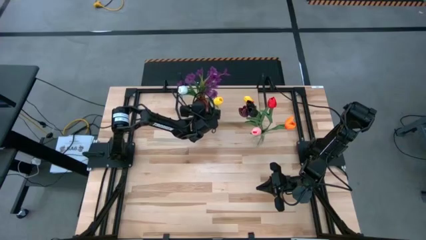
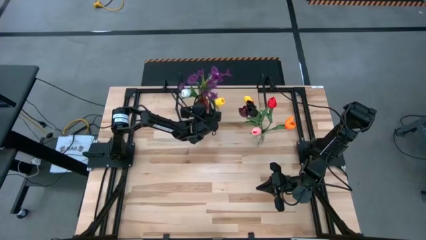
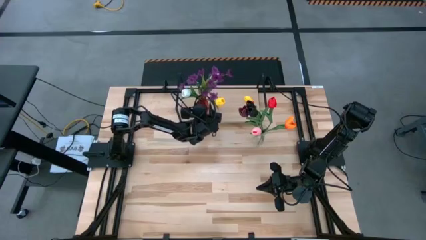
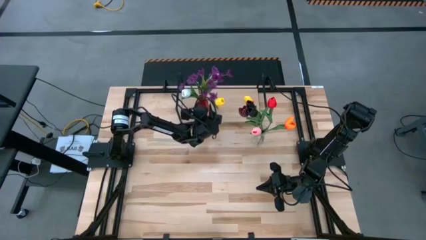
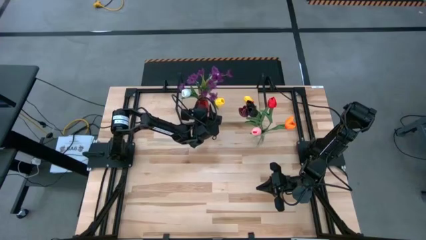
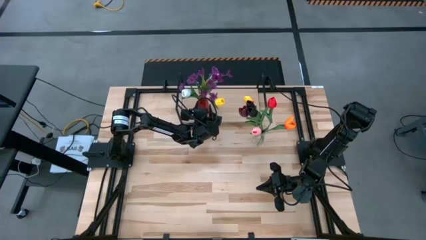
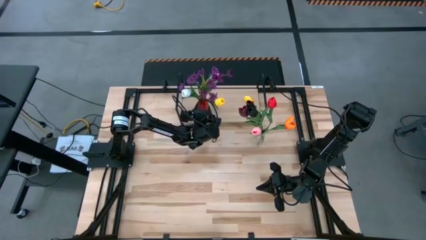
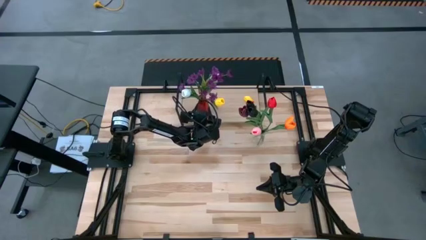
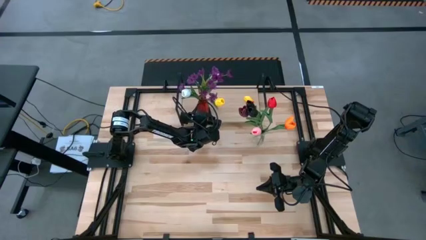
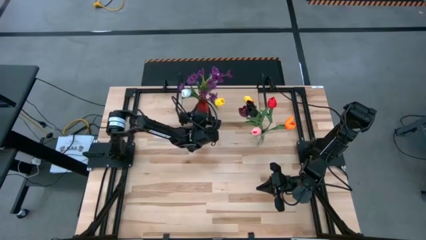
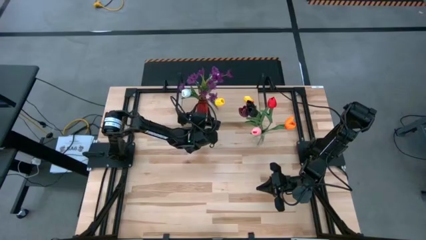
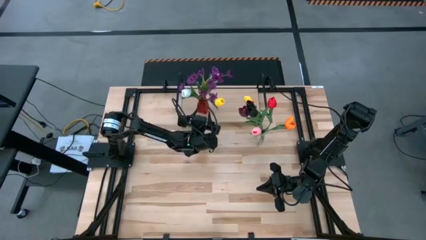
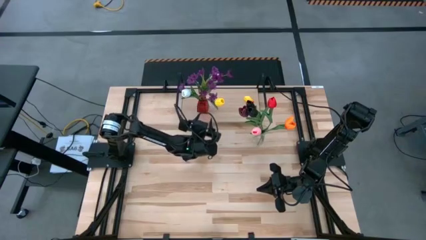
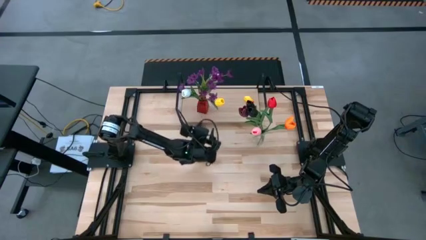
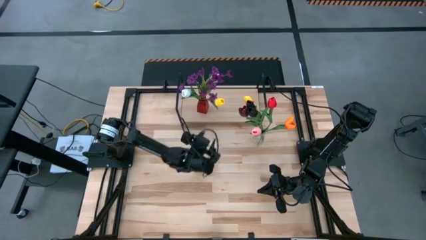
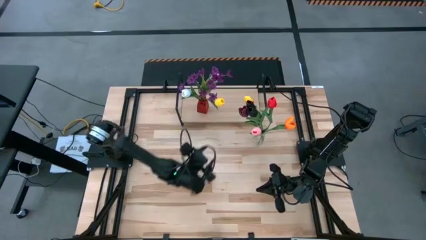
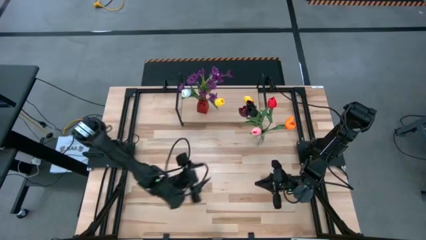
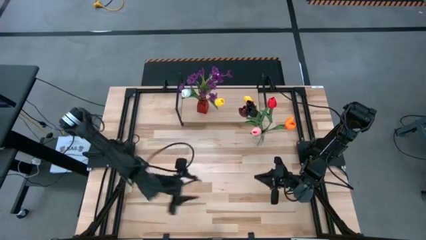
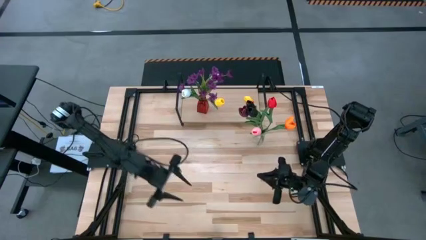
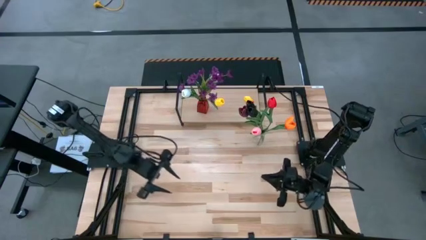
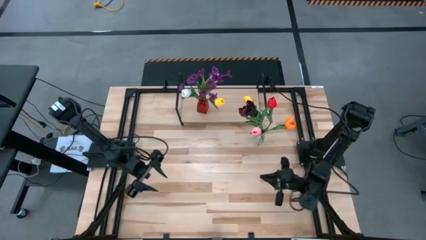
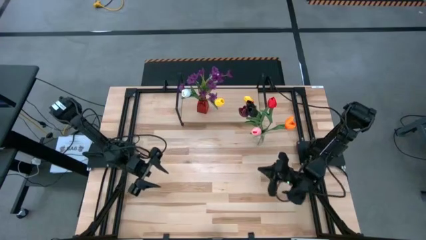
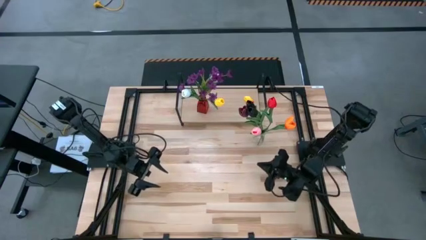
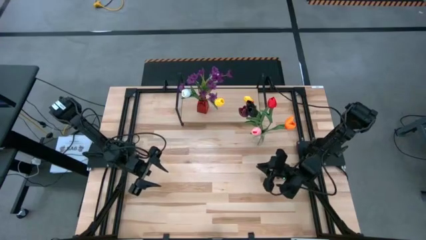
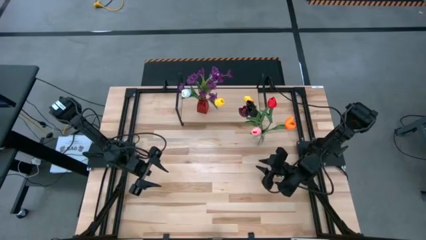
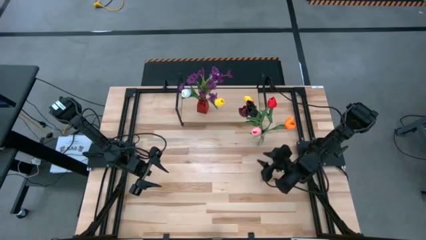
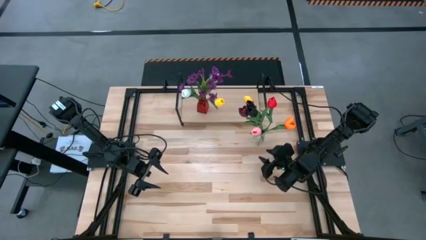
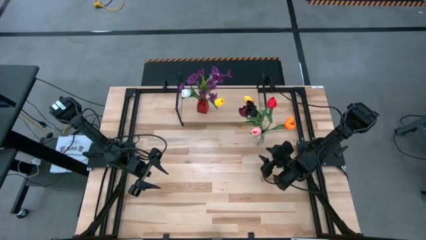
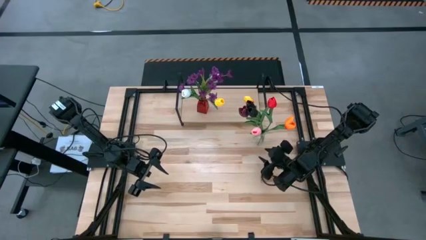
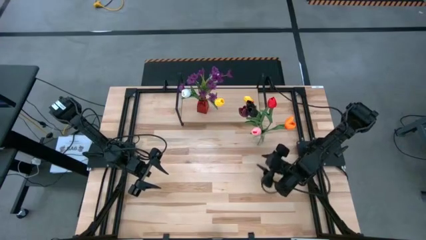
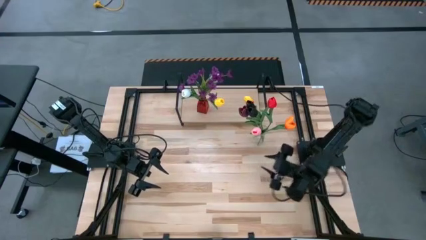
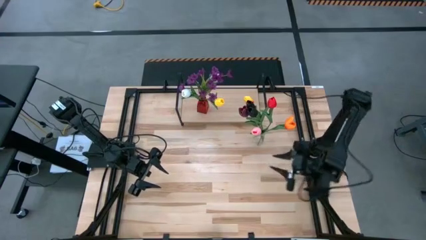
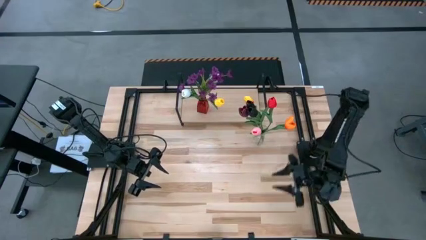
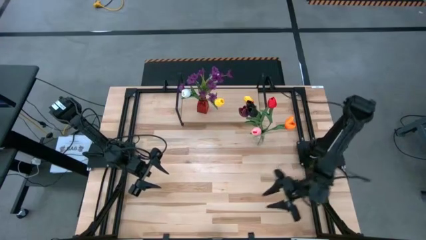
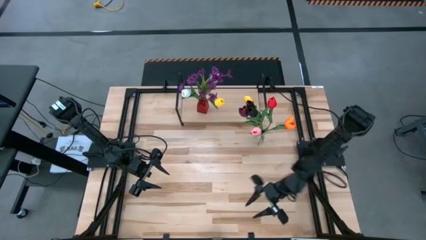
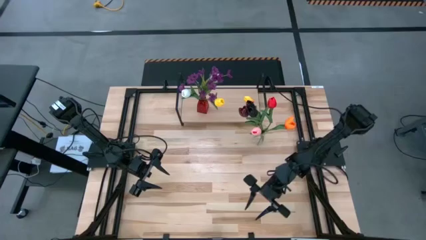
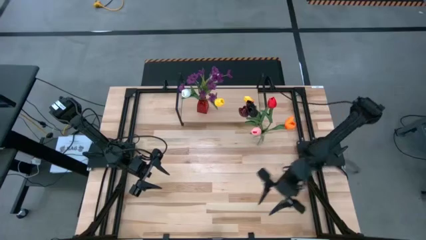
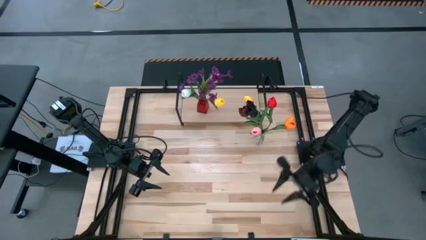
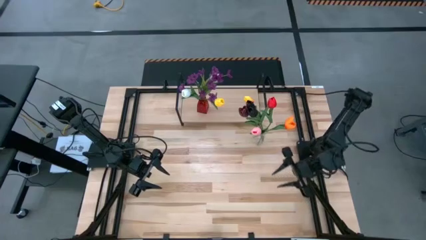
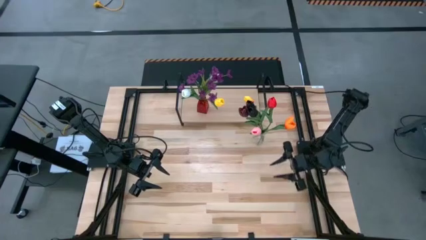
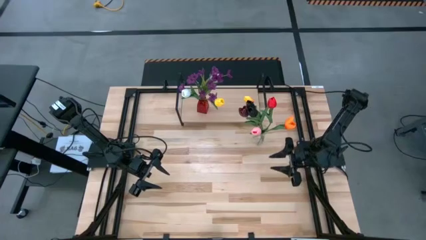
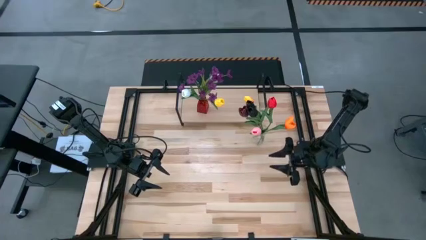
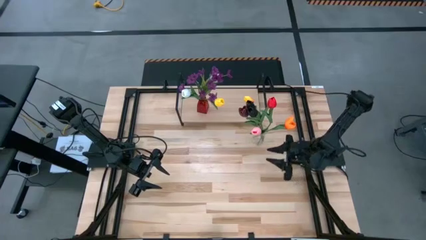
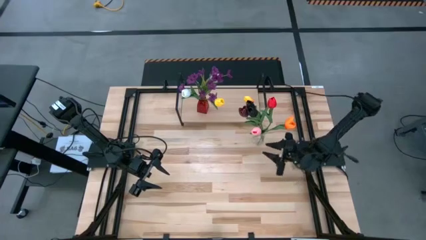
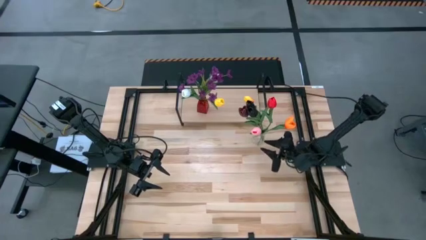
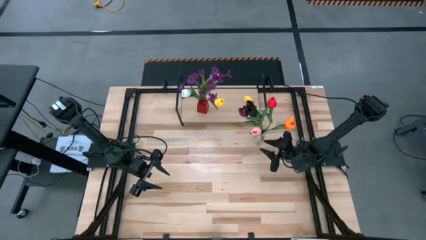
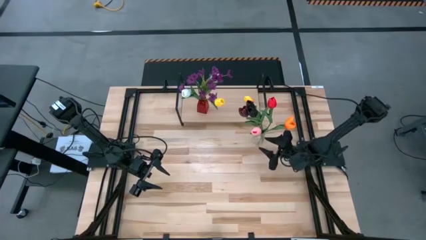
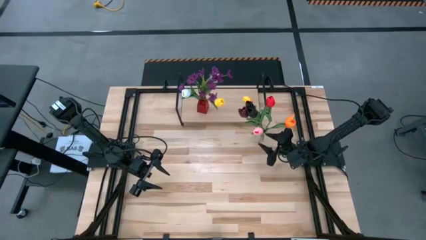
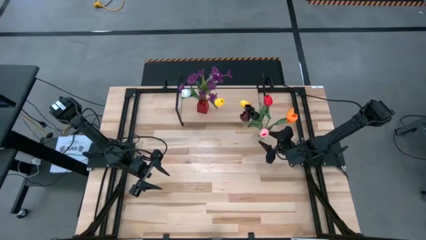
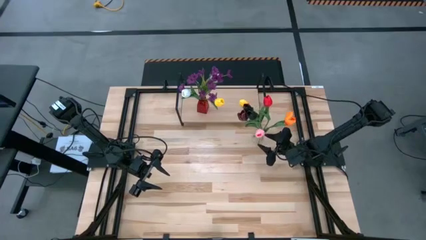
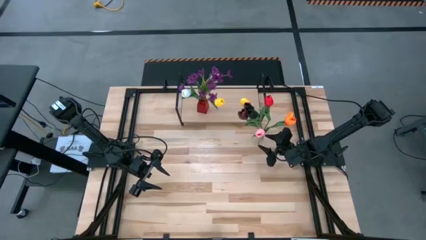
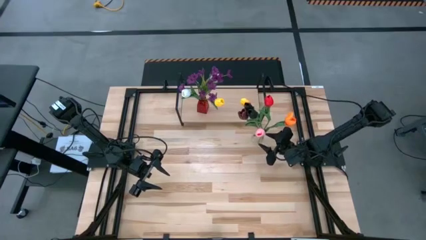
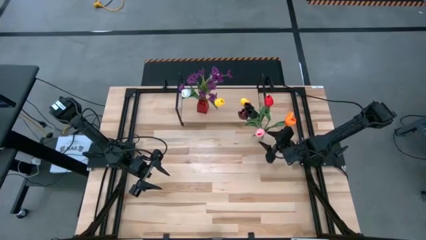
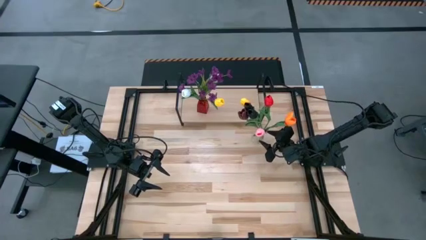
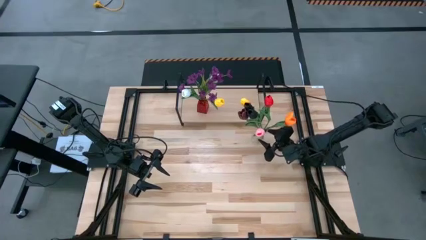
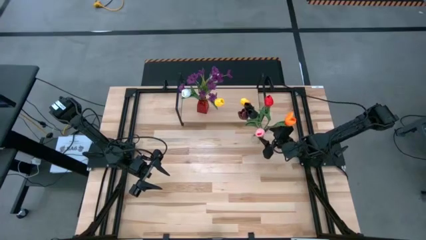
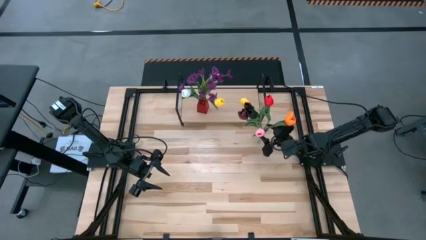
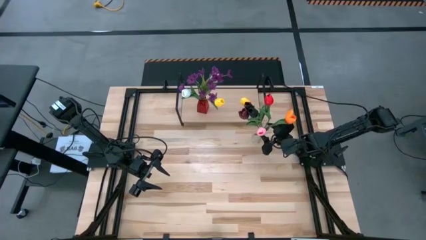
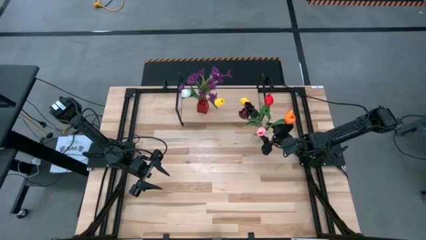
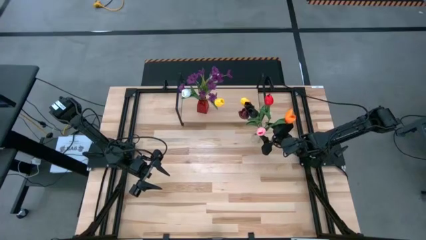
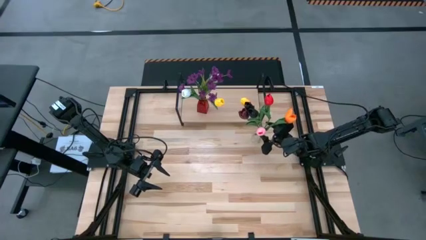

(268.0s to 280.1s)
Task: Pick and place flowers into a vace then onto a shelf
Put the transparent vase on the shelf

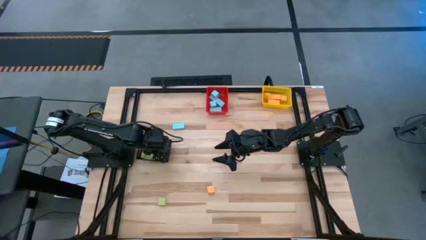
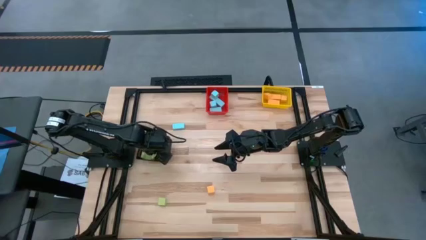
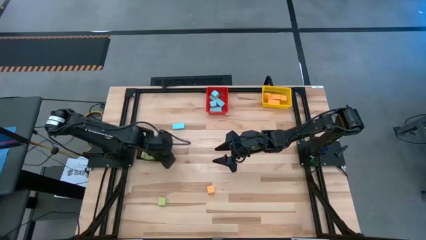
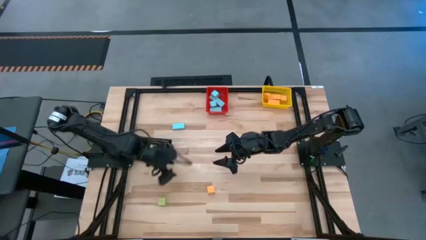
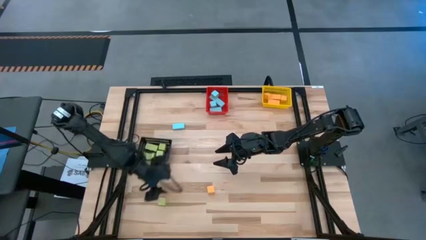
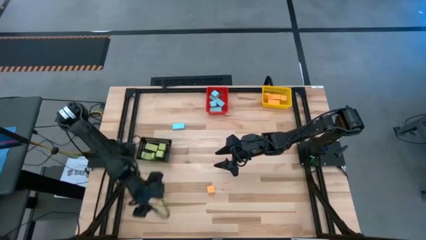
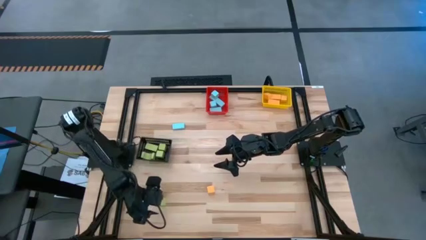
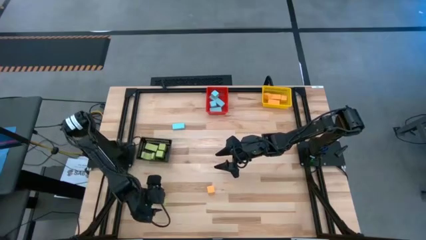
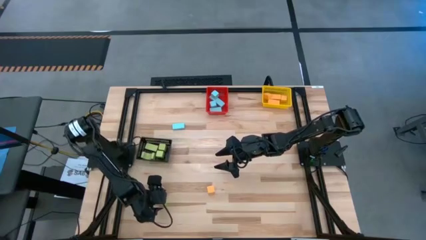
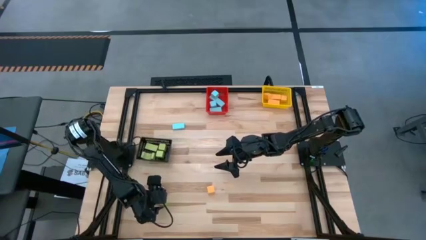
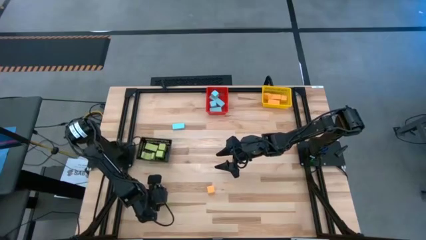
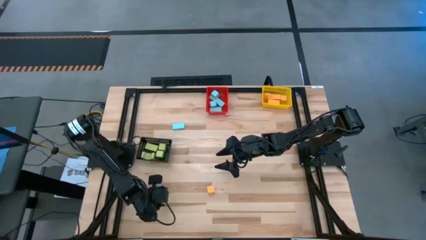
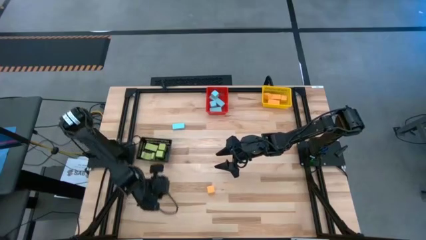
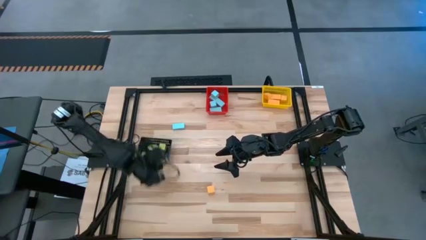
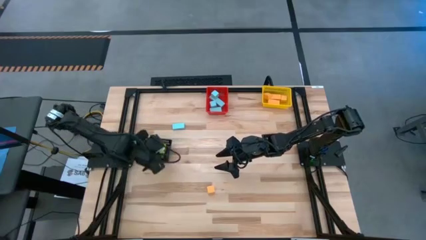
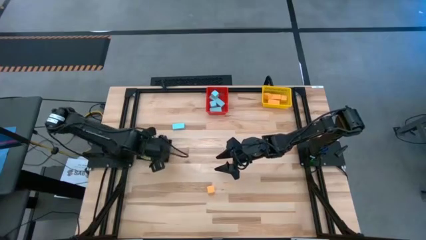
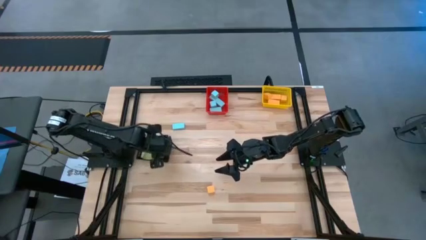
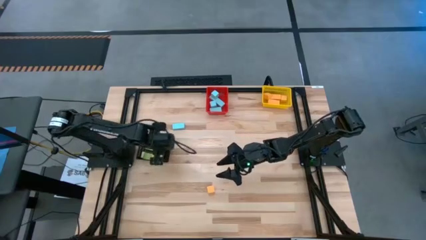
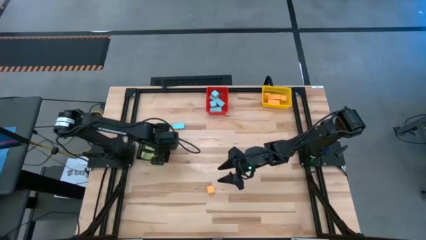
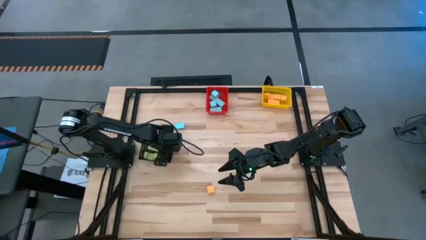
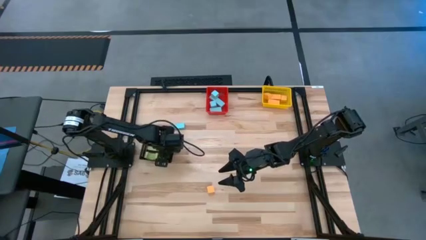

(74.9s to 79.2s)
Task: Sort & place blocks by color
Put the green block into the black bin
